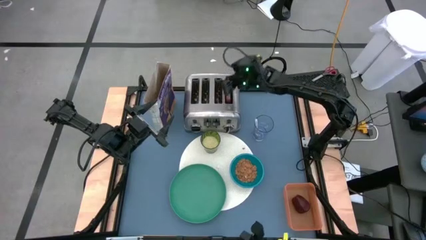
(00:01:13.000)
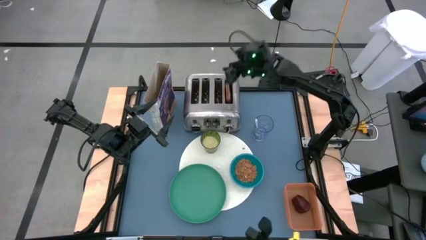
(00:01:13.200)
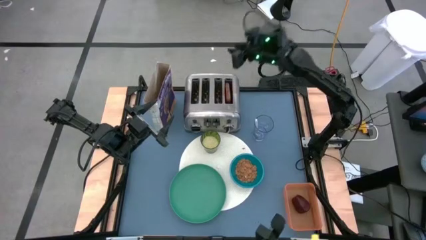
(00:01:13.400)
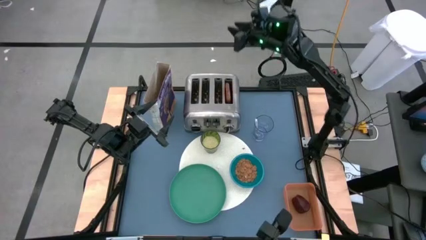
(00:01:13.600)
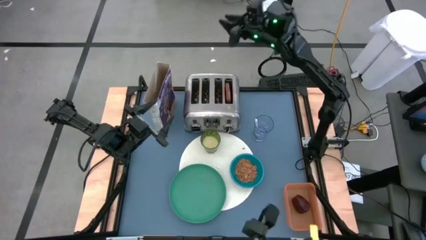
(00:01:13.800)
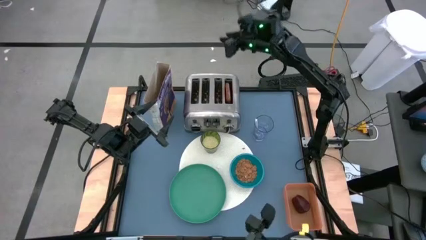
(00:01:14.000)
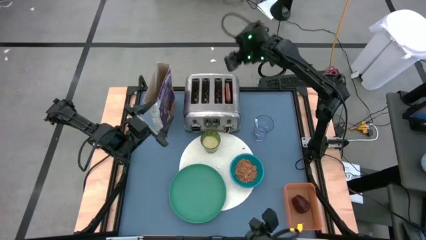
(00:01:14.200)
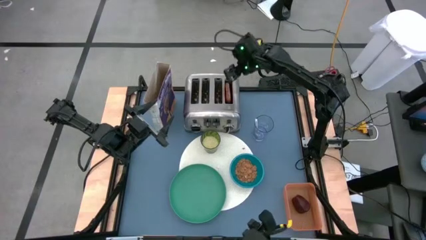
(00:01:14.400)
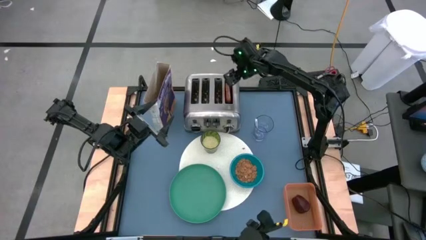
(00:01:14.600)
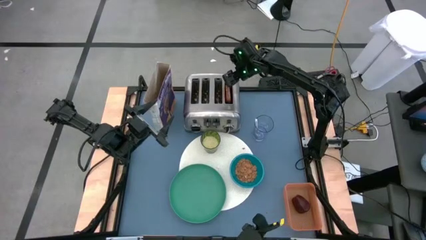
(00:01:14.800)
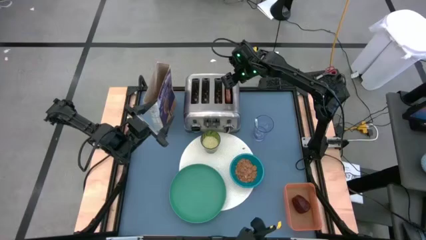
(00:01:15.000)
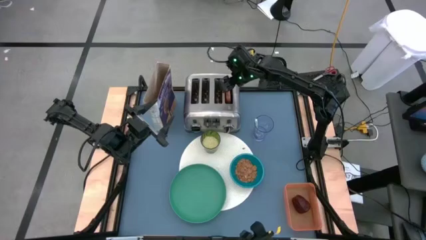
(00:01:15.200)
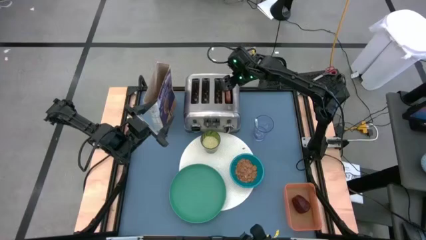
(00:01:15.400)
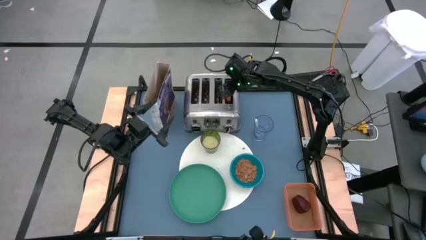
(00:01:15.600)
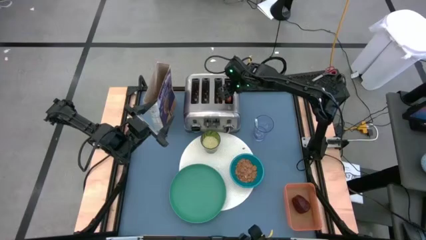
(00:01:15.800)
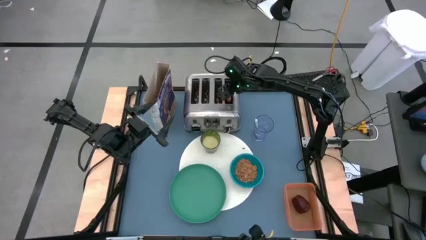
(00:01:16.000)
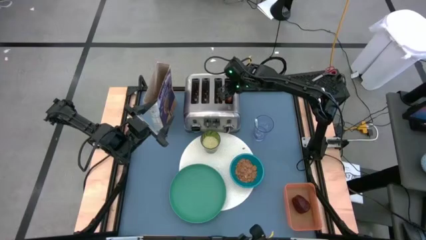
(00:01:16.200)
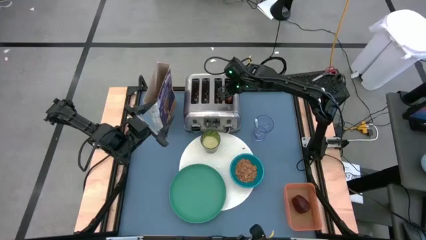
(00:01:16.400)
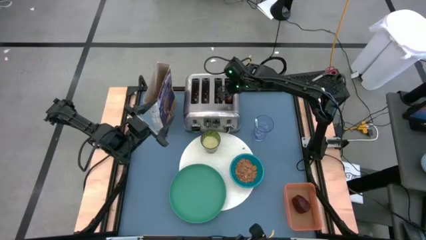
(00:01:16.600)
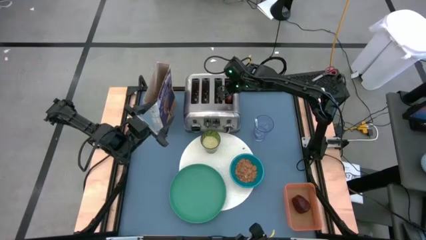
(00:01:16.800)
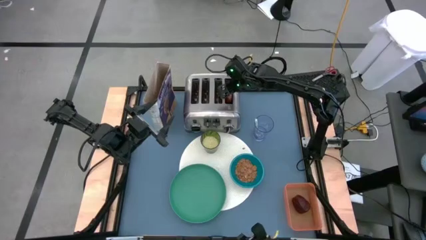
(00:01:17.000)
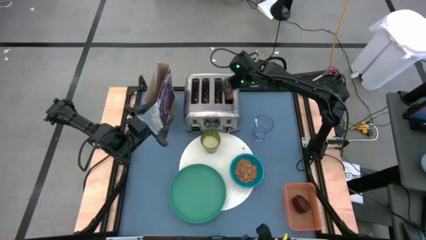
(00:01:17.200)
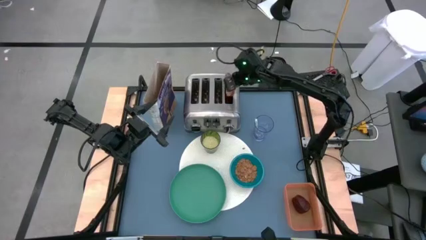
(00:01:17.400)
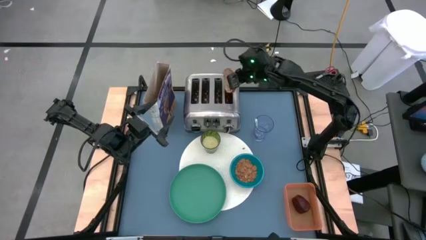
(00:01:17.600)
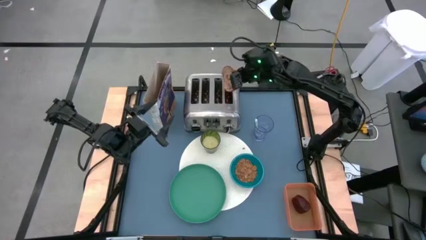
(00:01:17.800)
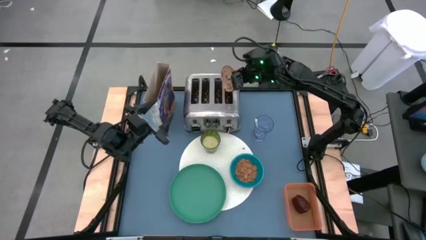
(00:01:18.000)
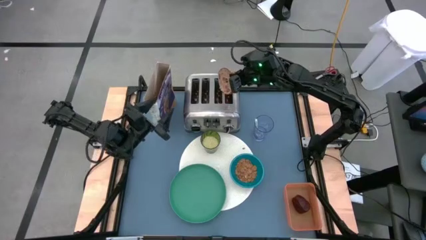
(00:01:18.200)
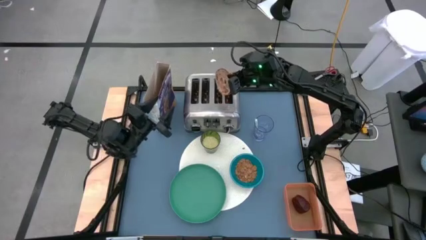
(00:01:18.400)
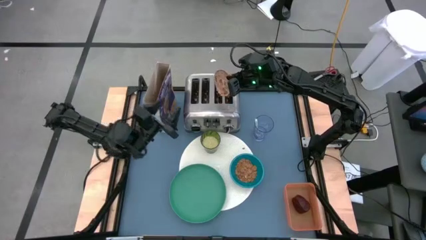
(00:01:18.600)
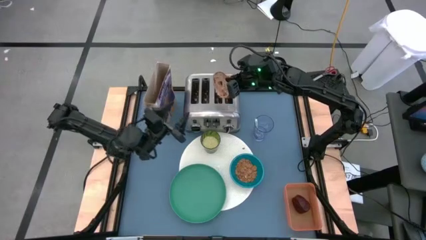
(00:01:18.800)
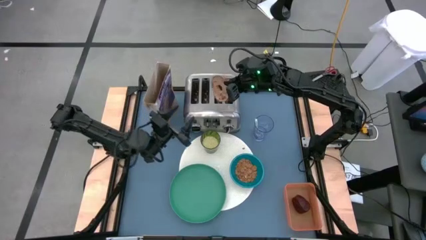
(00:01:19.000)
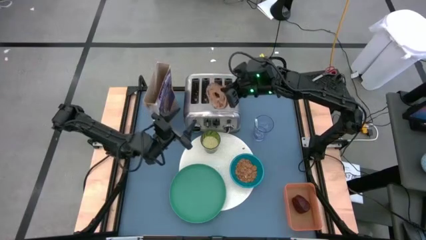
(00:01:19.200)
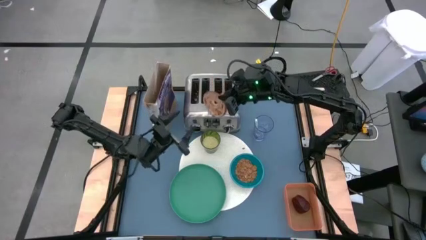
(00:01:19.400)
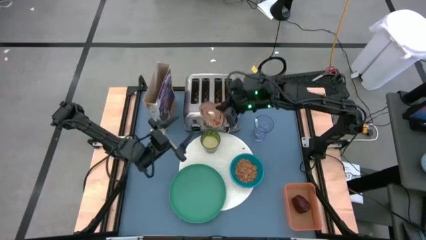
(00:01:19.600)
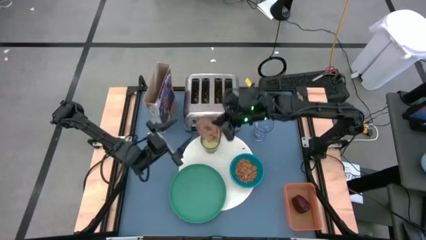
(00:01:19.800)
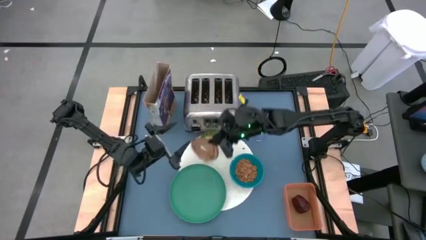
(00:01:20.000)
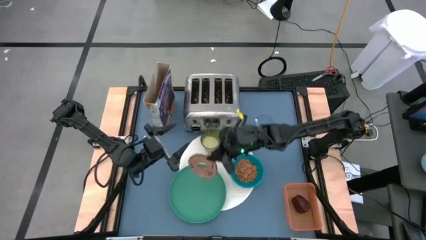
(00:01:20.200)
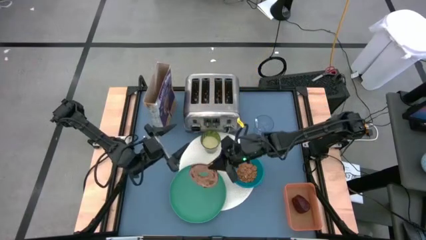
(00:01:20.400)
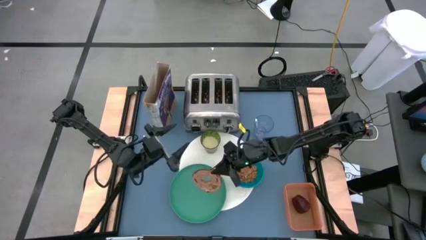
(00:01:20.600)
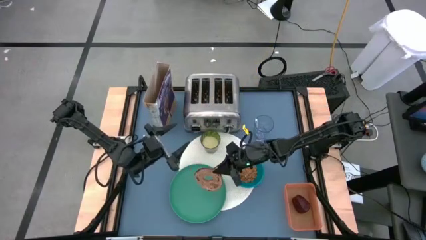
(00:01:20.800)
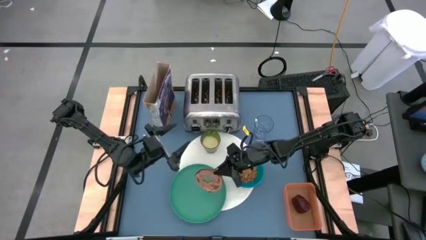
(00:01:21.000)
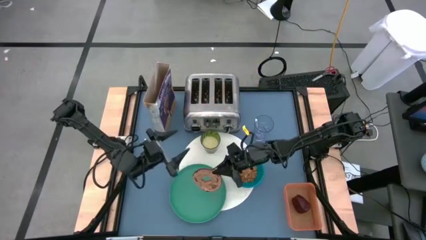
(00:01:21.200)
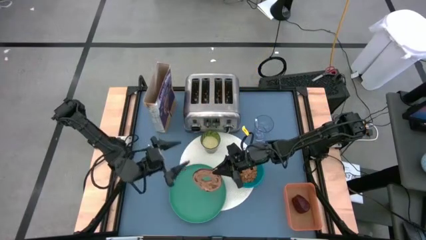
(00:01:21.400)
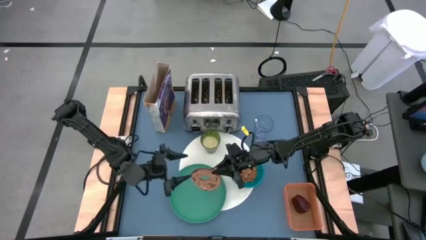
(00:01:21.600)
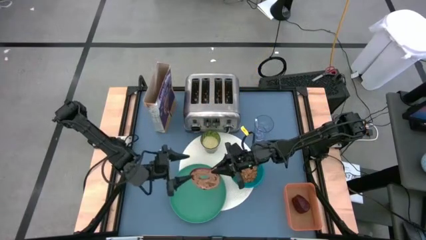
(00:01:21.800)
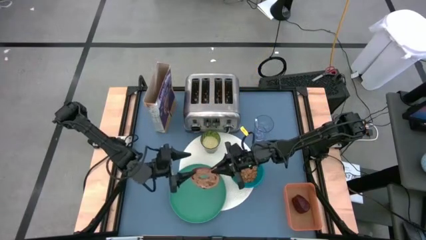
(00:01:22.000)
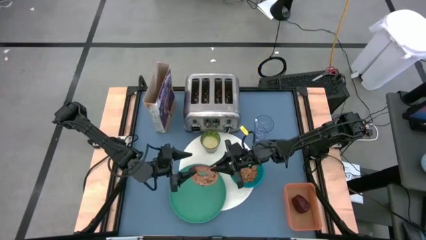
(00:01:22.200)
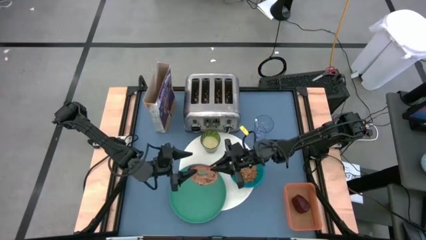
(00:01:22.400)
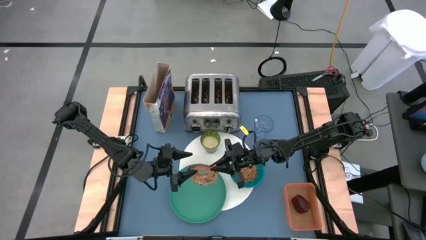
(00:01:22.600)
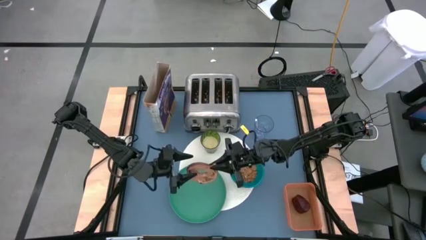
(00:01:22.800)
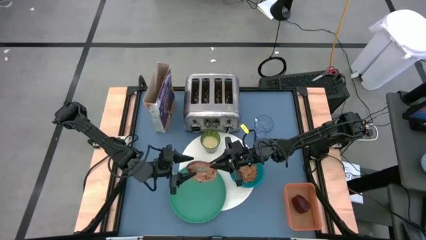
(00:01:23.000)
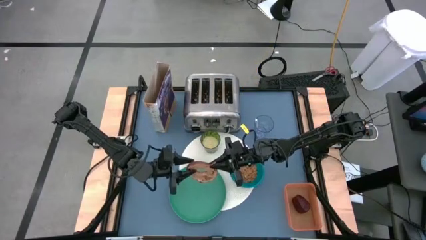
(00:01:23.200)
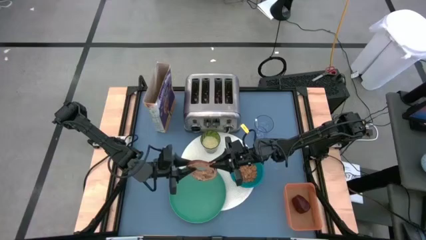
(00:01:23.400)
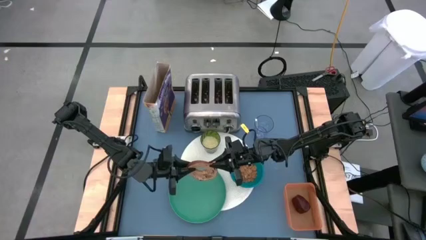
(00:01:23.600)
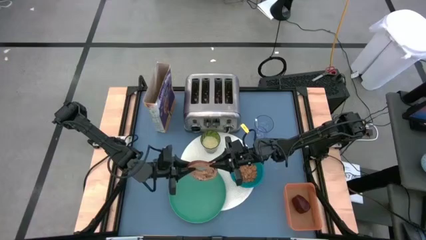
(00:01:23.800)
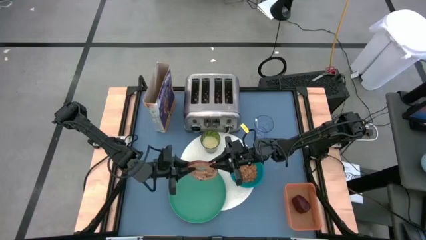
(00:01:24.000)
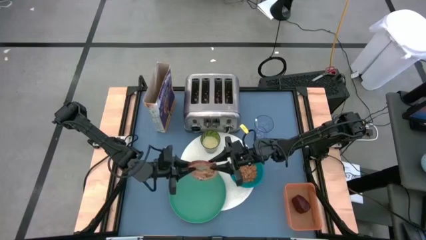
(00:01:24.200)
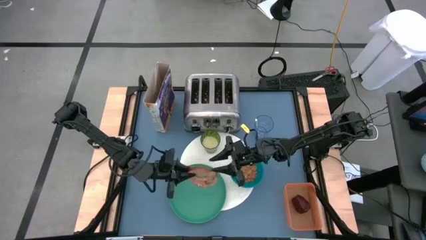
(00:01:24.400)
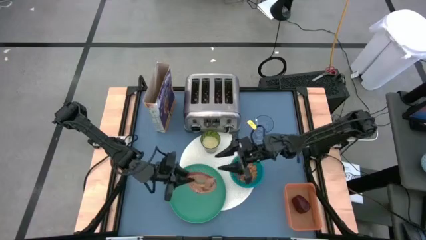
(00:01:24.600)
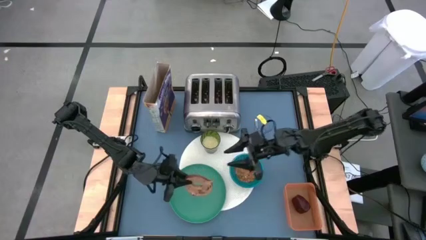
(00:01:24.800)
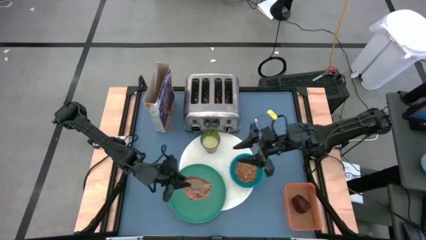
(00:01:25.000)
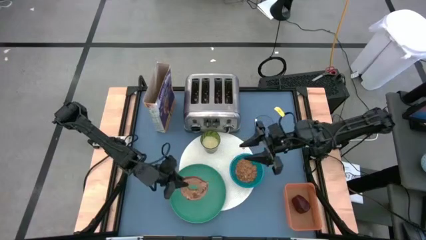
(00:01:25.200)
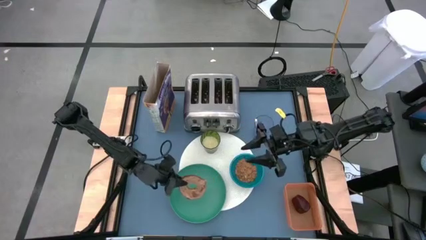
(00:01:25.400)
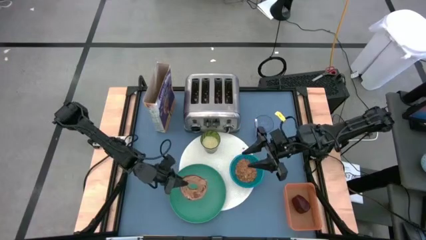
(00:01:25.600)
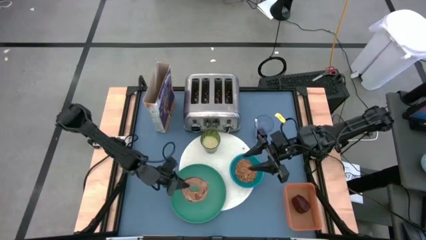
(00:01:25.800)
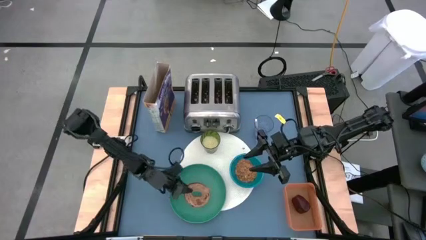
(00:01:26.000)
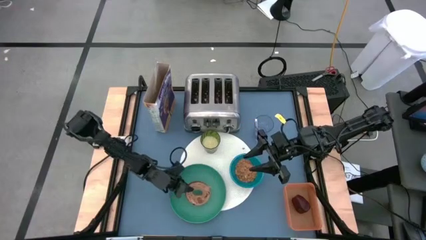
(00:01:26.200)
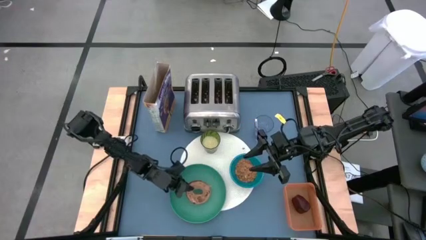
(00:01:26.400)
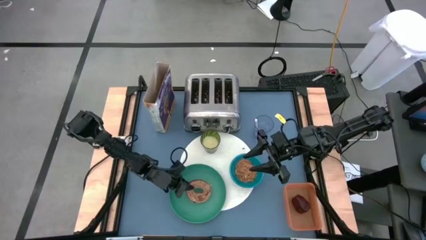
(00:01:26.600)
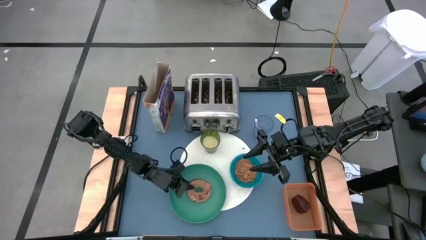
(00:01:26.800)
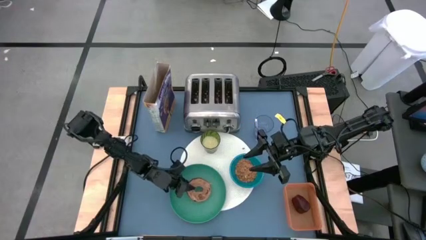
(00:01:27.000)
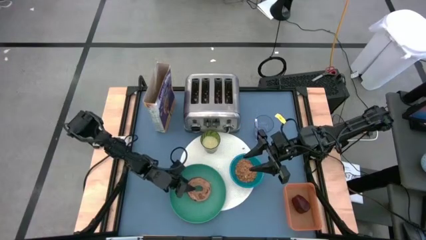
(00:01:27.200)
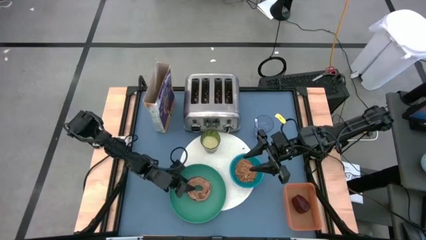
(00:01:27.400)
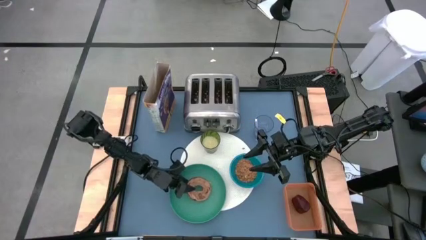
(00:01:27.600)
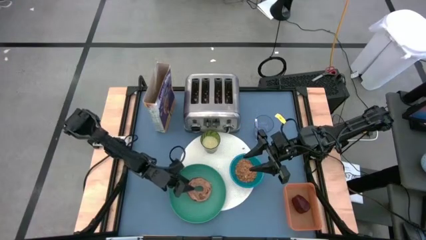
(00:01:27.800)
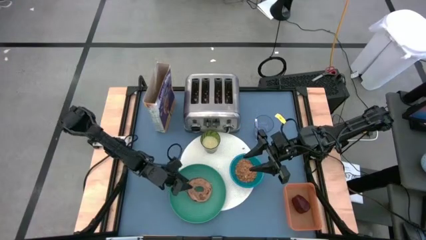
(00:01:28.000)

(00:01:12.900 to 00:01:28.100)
Task: Arrange a breakfast setting
Put the bread on the green plate

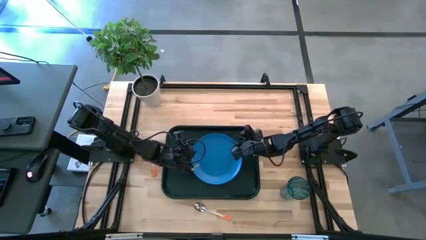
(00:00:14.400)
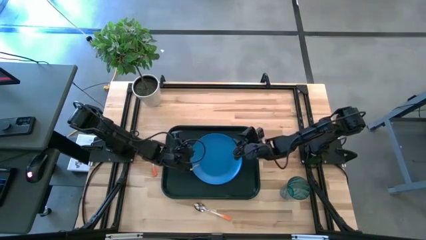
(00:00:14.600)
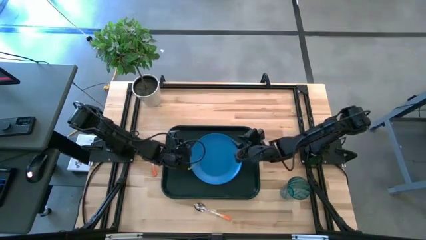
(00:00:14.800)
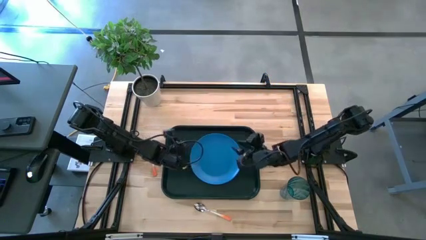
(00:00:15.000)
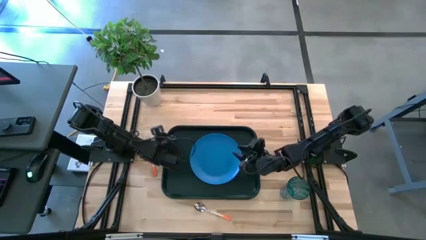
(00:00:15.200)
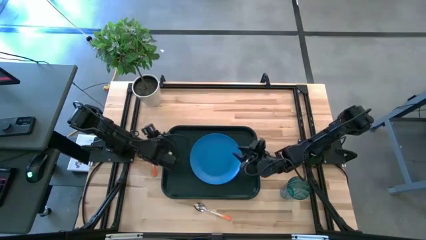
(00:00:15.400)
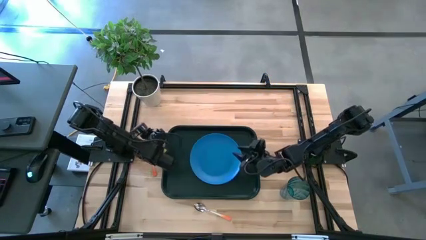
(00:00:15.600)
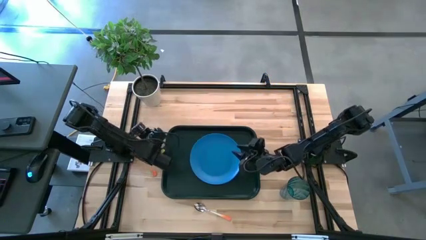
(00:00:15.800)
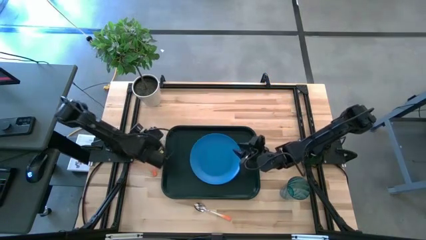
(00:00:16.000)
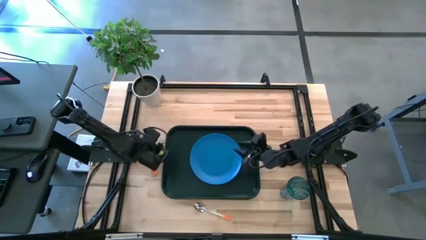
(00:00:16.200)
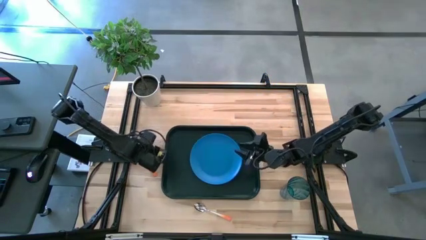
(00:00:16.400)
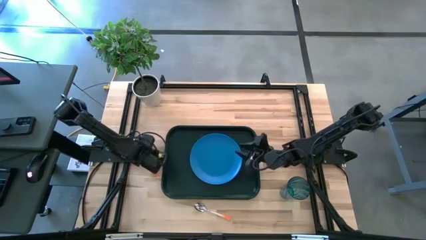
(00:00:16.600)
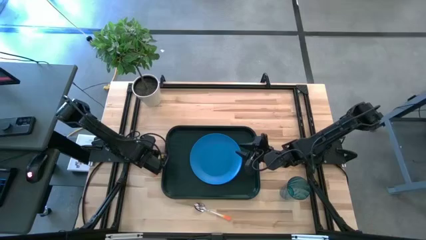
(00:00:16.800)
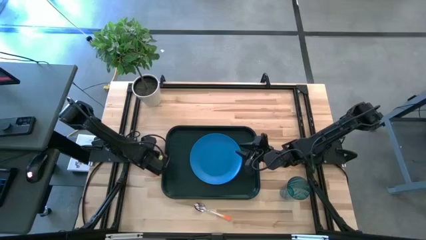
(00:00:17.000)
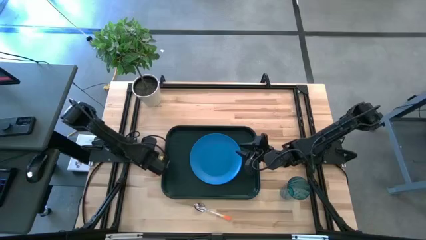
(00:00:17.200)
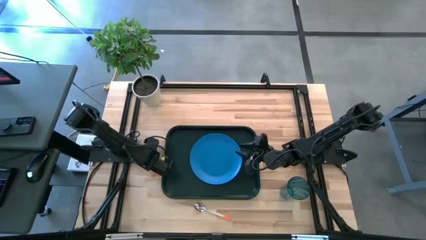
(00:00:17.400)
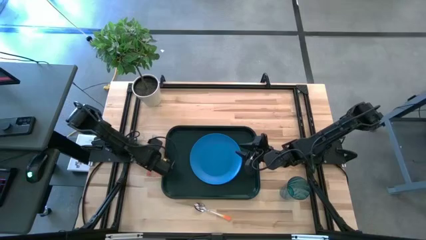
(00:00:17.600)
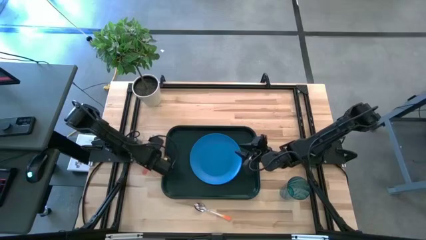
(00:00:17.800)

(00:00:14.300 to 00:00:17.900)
Task: Pick and place plate/cup/fork/spoon on tray
Put the orange fork on the black tray
